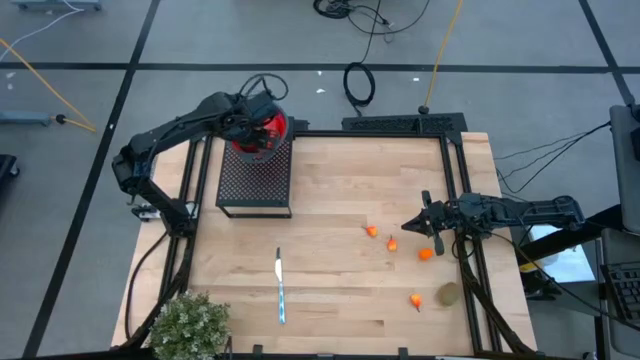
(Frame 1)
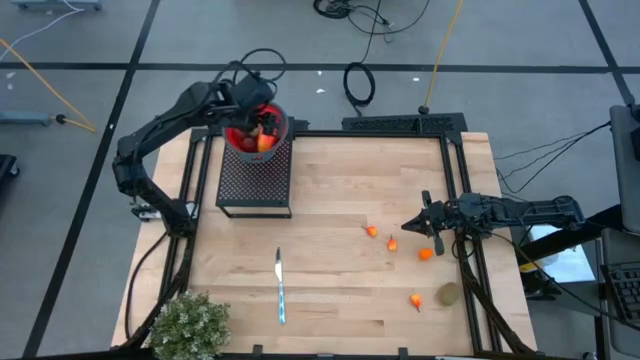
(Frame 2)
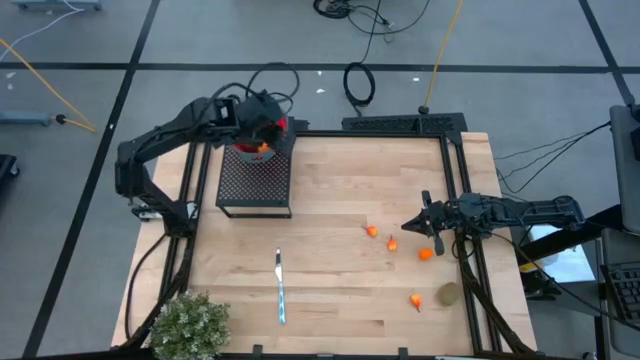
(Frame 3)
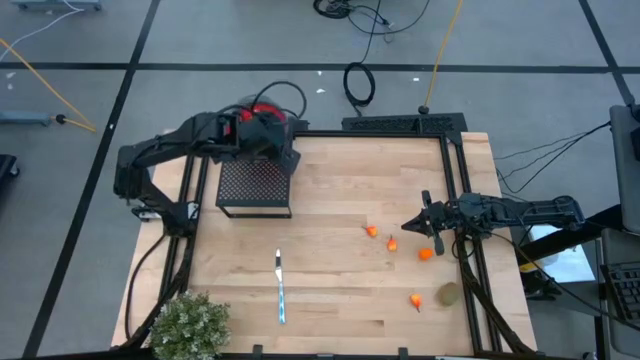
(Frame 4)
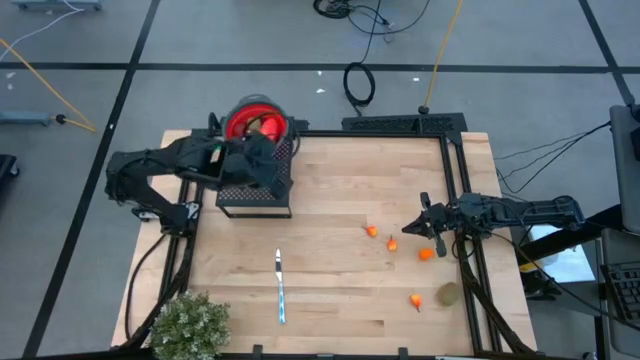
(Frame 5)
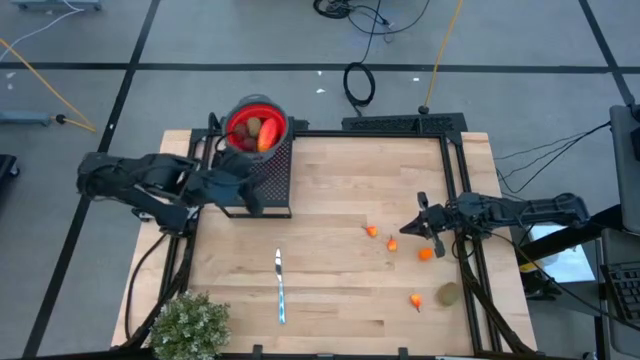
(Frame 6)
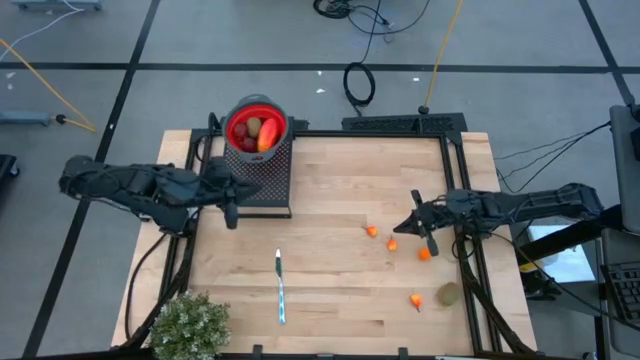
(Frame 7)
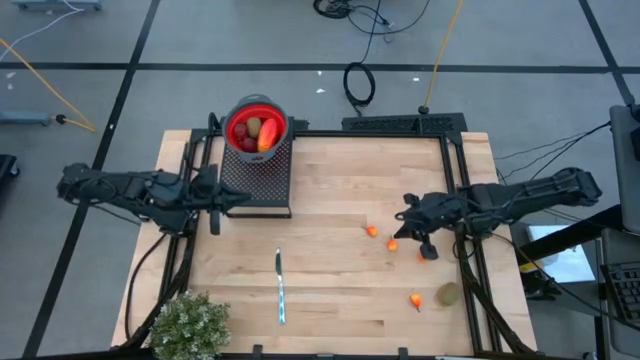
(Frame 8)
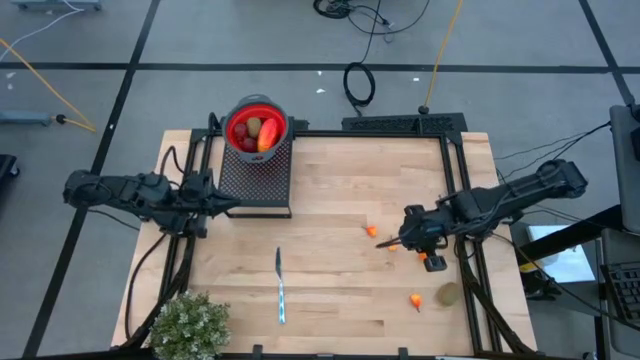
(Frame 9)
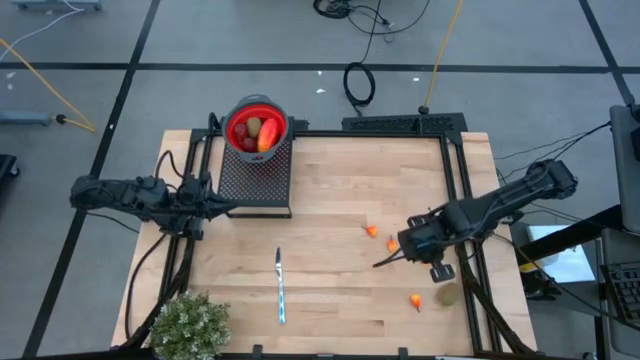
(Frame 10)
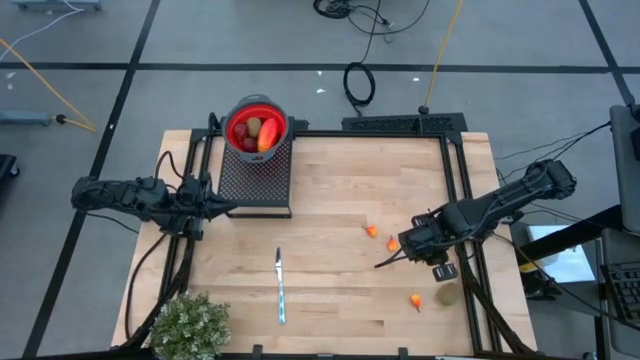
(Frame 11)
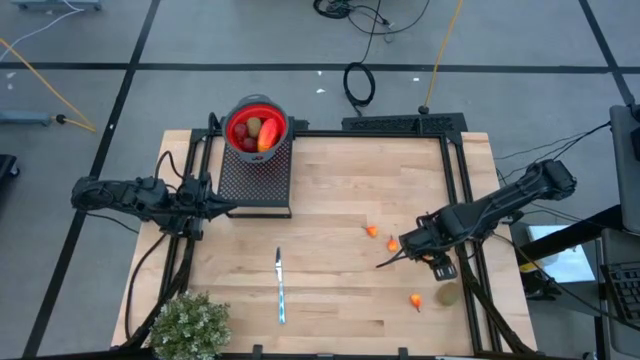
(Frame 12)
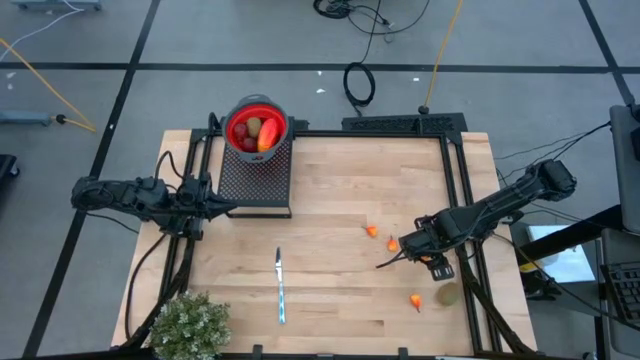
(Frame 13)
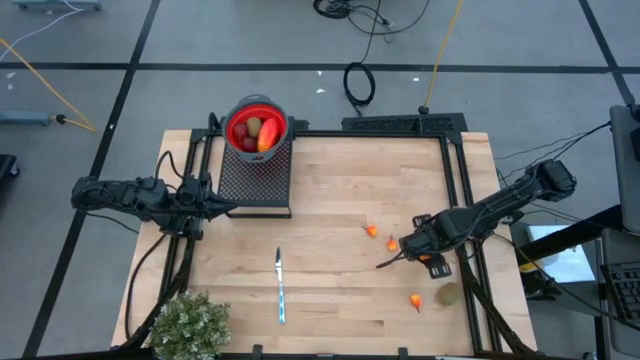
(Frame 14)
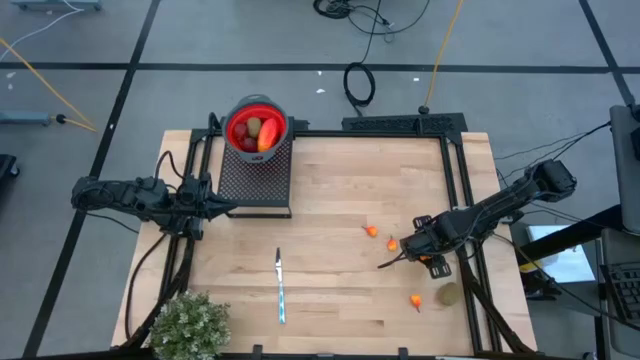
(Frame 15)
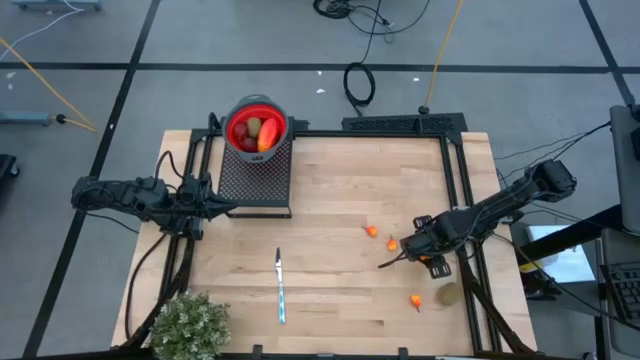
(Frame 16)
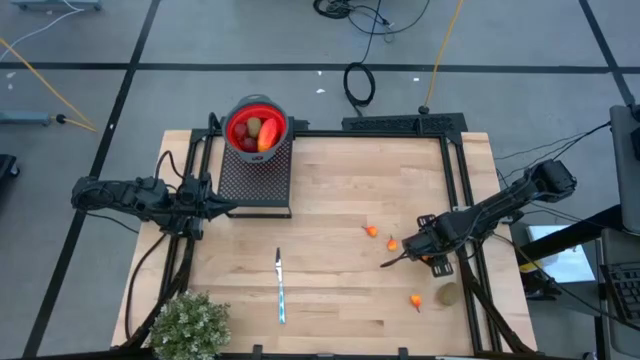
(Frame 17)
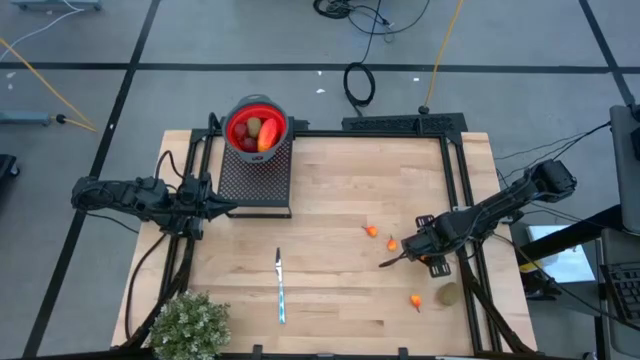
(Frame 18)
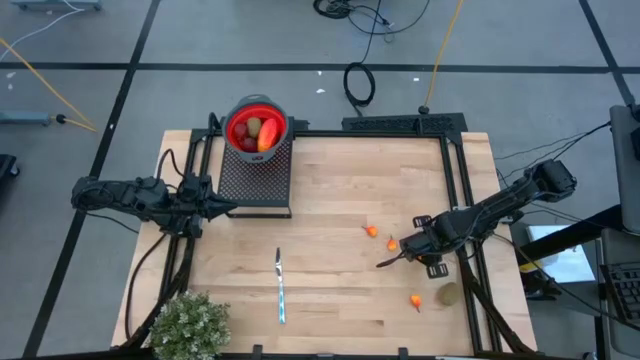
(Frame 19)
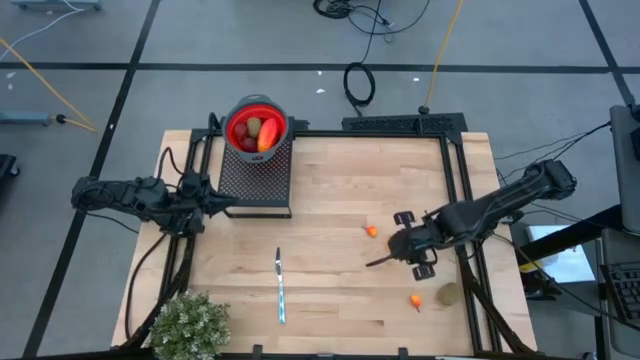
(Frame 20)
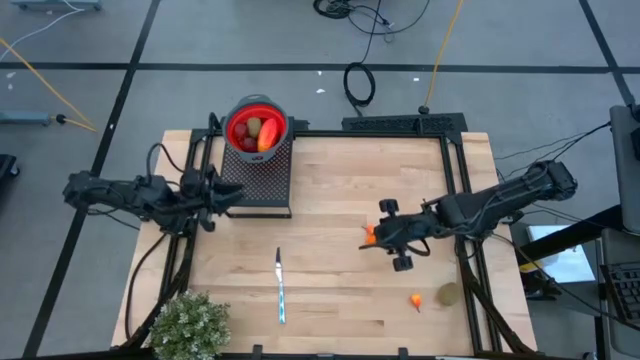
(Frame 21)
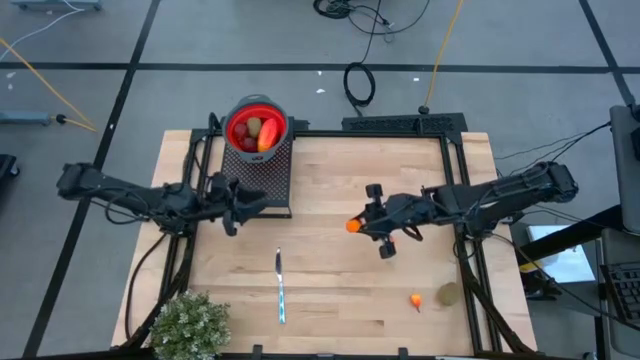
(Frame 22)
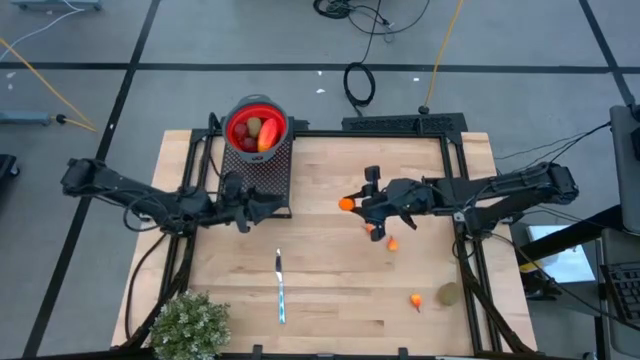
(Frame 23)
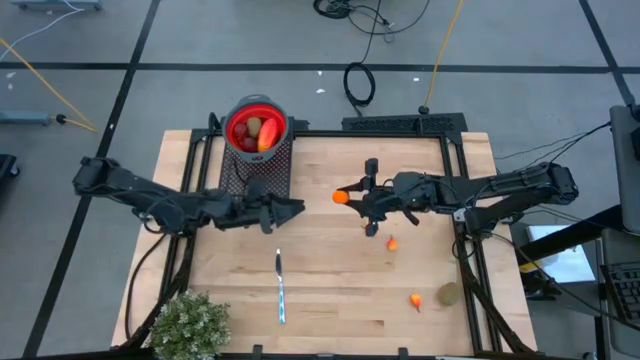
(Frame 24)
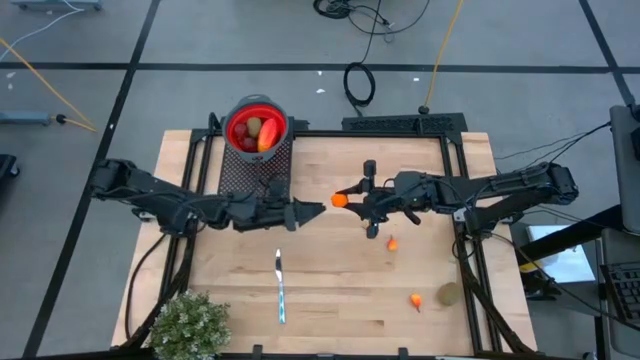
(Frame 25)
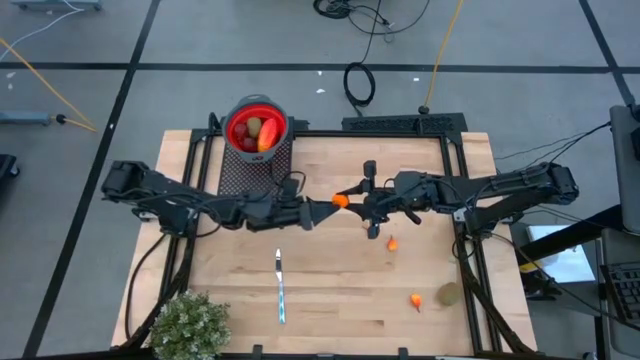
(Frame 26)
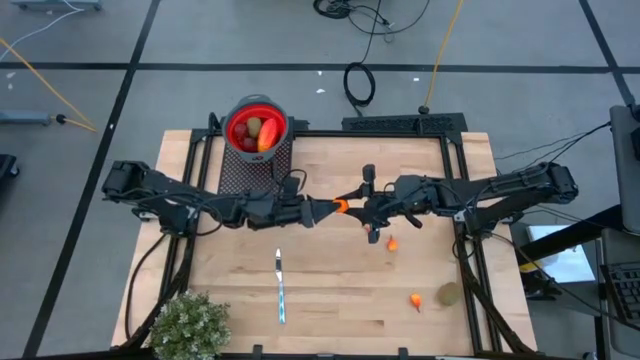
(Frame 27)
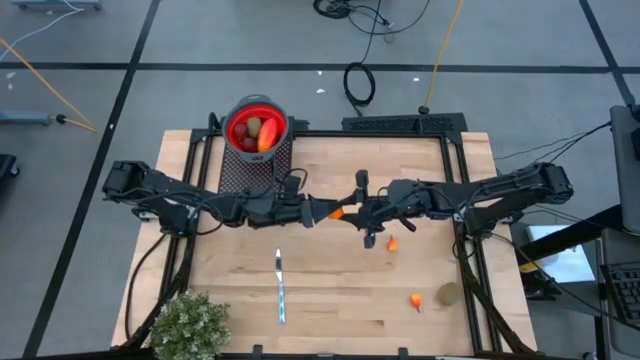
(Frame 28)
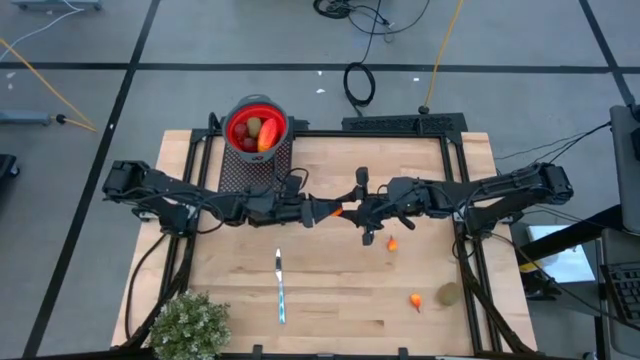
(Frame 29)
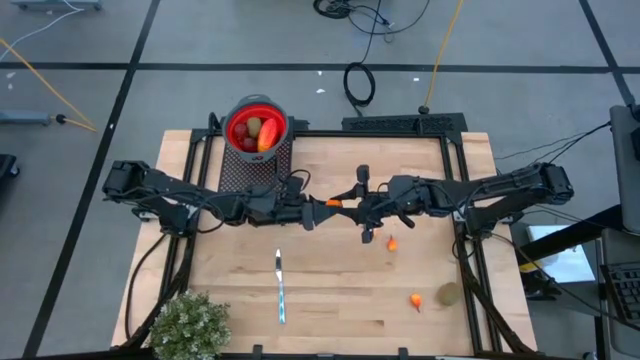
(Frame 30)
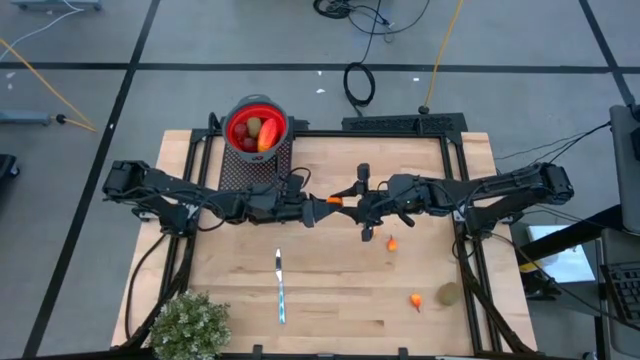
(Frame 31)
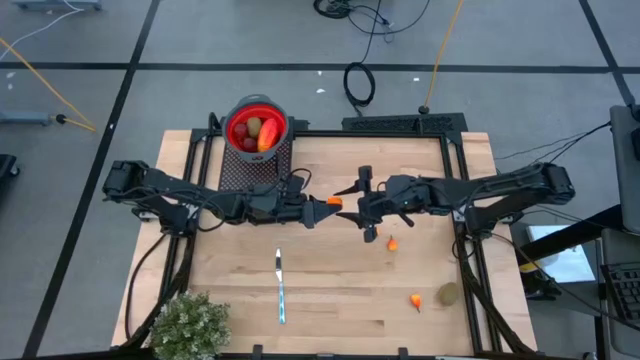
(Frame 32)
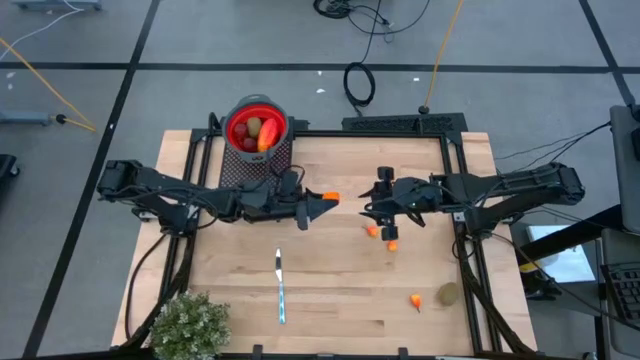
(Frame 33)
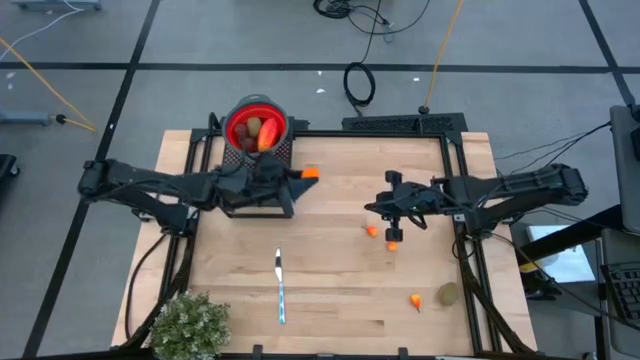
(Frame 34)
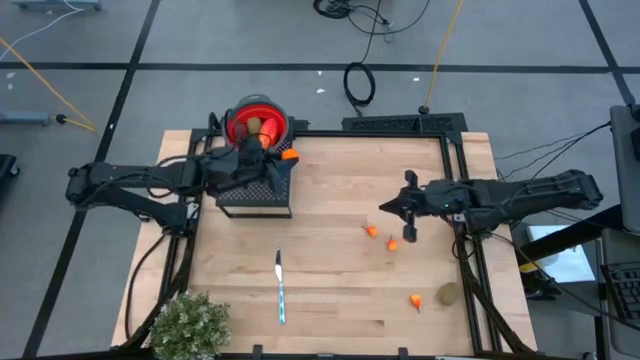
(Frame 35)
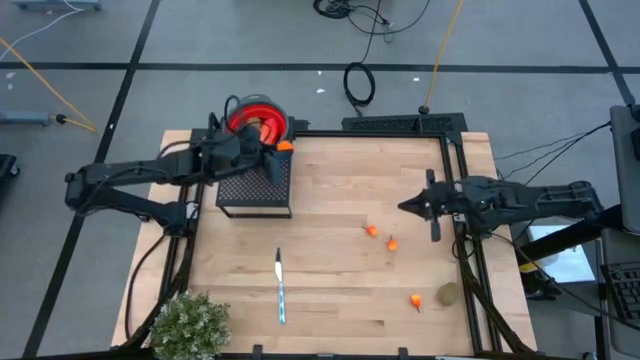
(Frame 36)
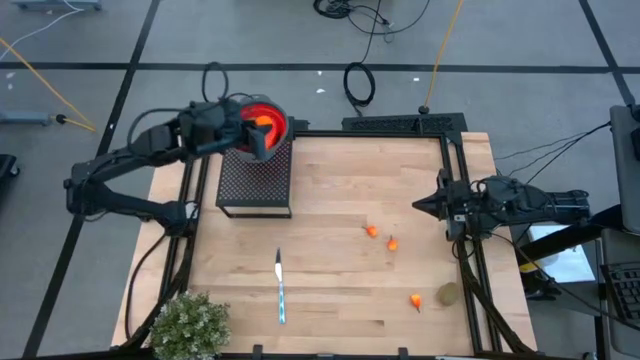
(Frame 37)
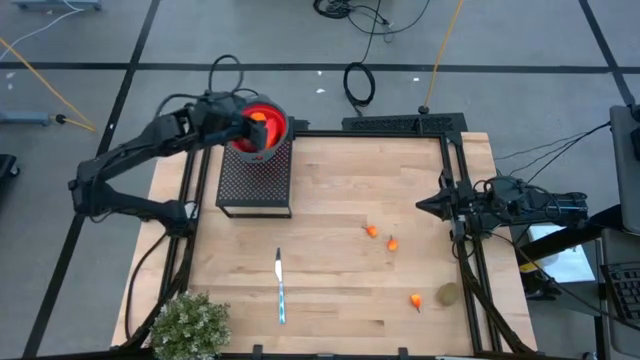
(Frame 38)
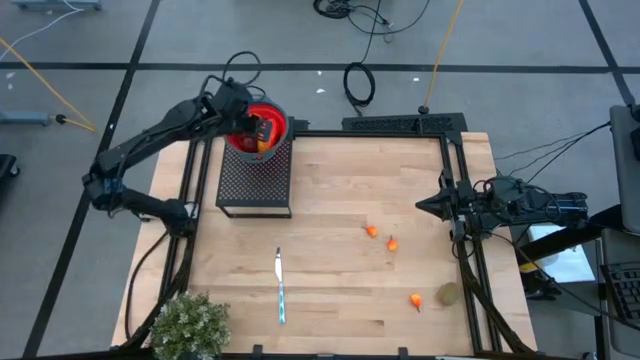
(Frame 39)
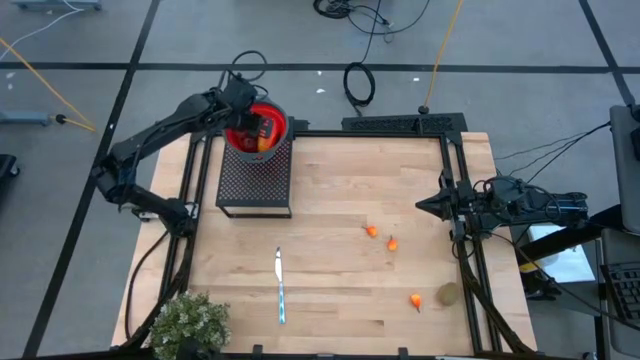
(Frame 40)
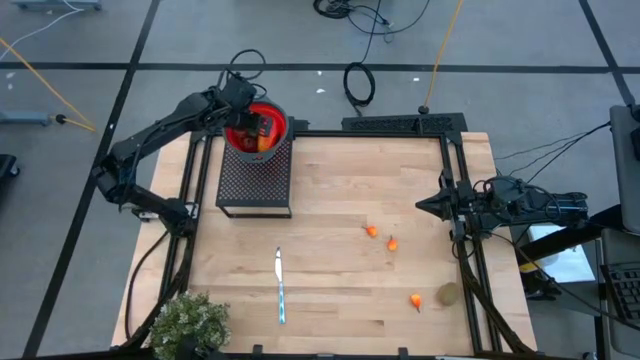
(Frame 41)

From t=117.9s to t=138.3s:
Task: Pick & Place Fruit
Put the orange into the red strainer bowl on the shelf

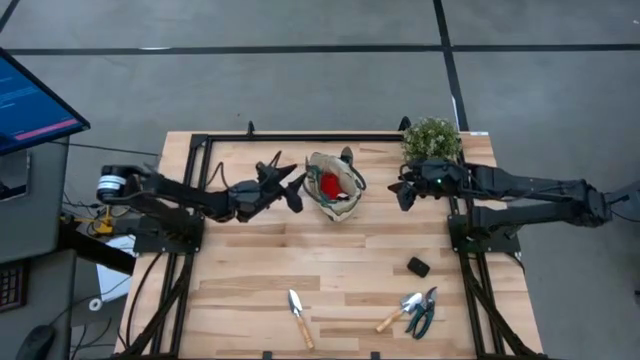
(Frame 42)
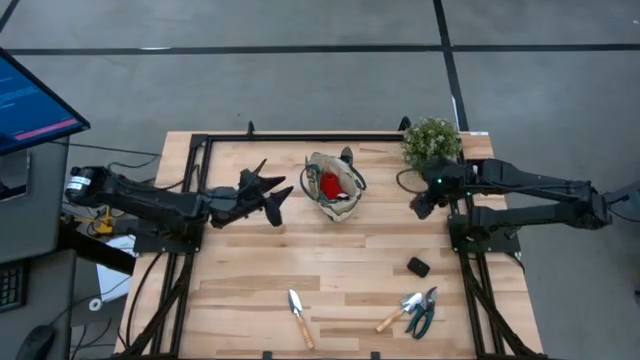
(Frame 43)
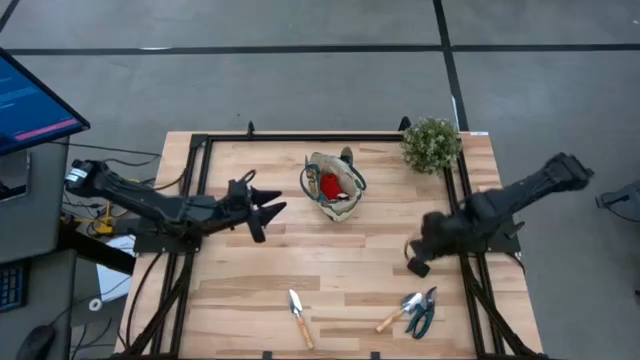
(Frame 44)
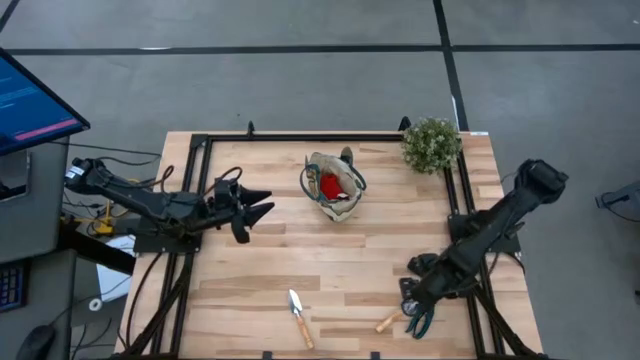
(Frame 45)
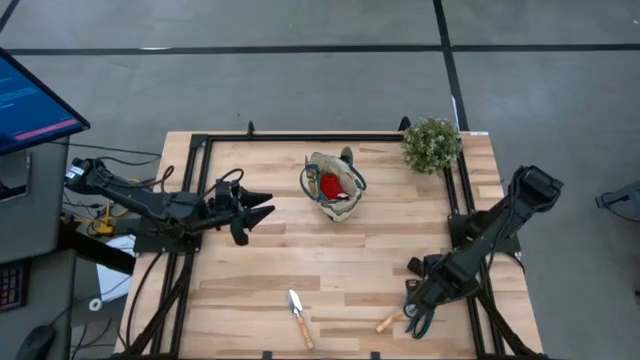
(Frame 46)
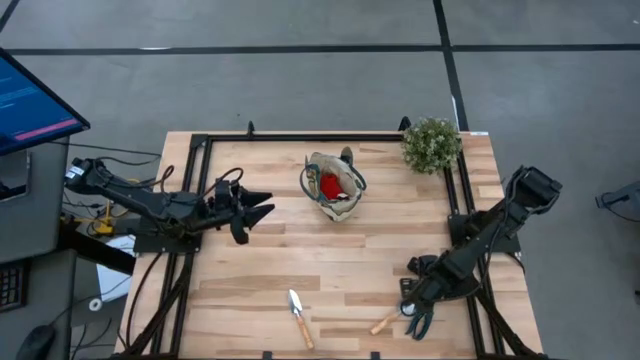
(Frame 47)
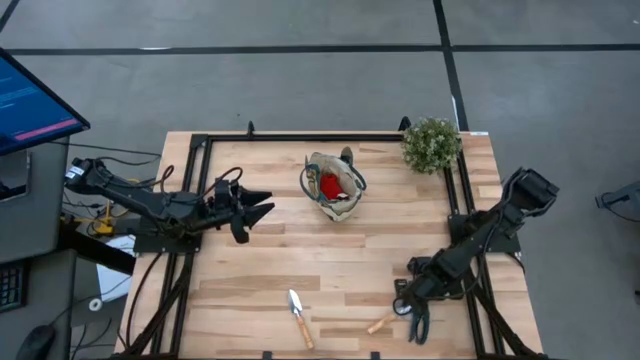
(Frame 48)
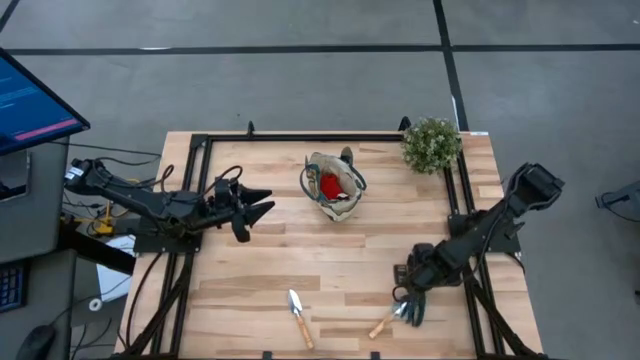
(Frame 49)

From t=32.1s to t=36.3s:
Task: Pick & Place Garden tools in Gardening bag
Put the green shear scissors into the green gardening bag
